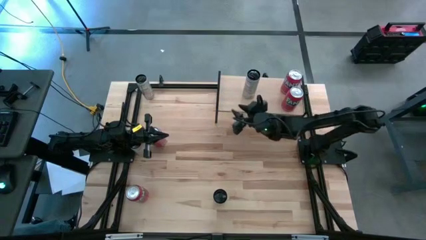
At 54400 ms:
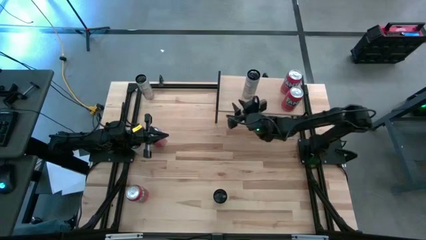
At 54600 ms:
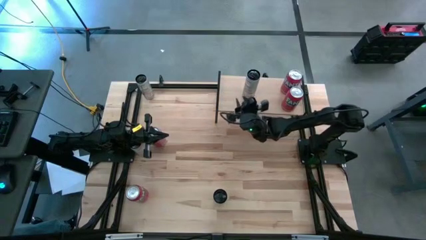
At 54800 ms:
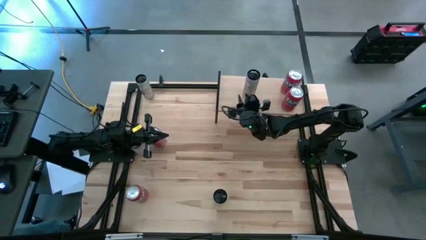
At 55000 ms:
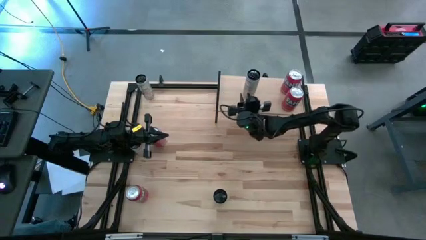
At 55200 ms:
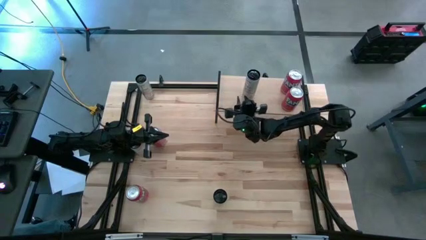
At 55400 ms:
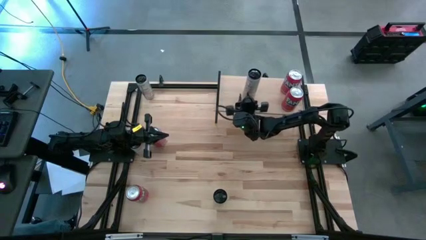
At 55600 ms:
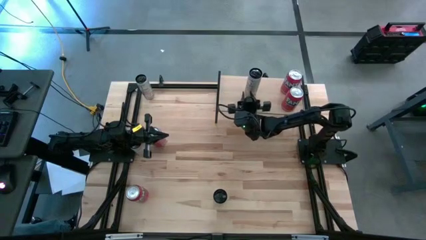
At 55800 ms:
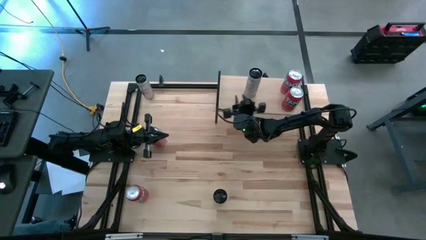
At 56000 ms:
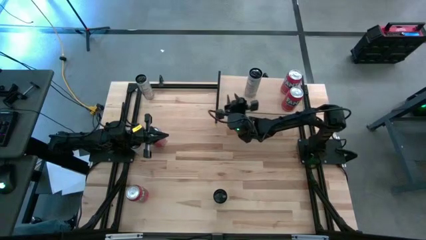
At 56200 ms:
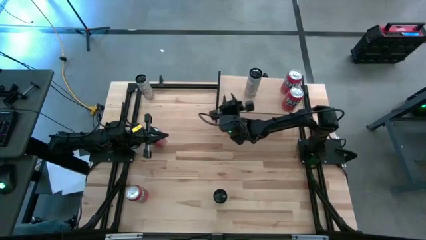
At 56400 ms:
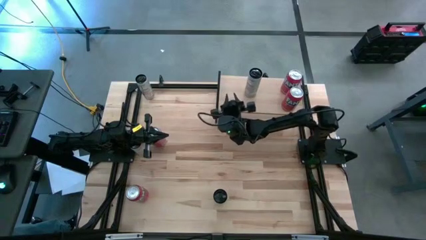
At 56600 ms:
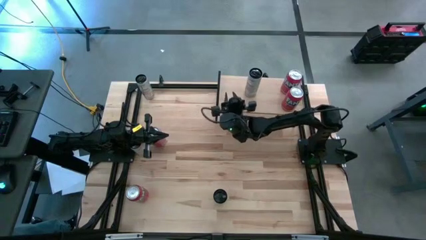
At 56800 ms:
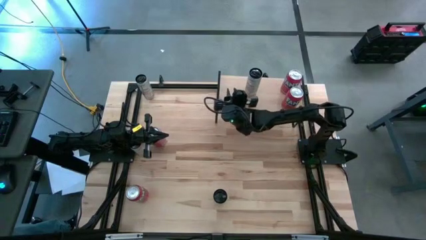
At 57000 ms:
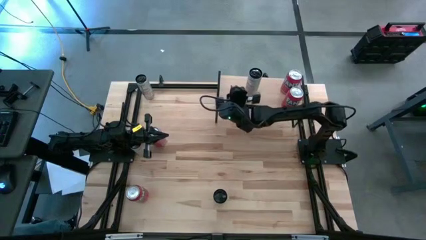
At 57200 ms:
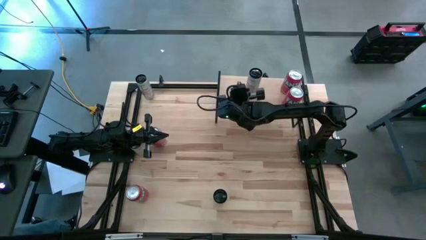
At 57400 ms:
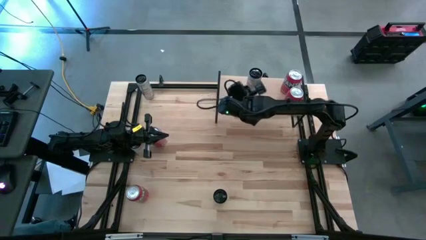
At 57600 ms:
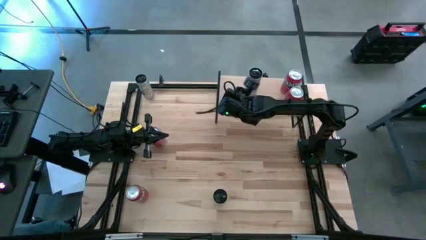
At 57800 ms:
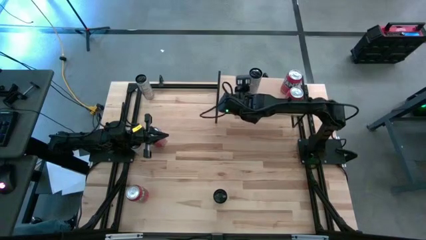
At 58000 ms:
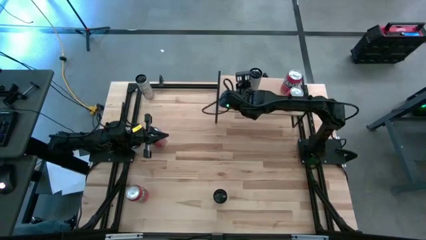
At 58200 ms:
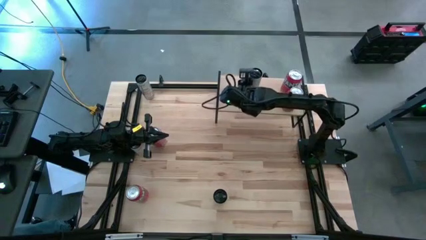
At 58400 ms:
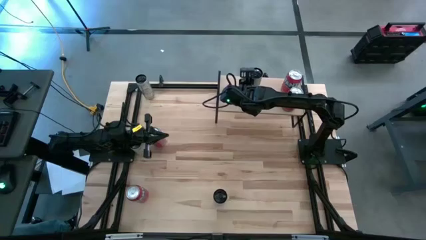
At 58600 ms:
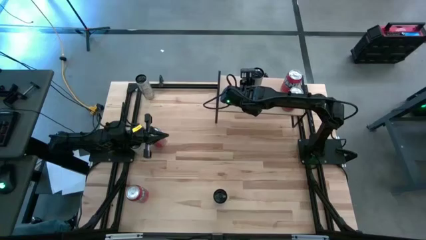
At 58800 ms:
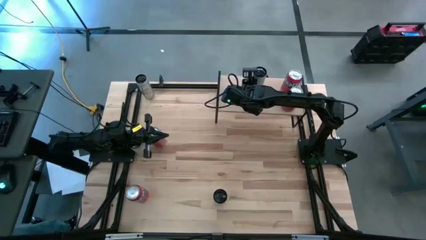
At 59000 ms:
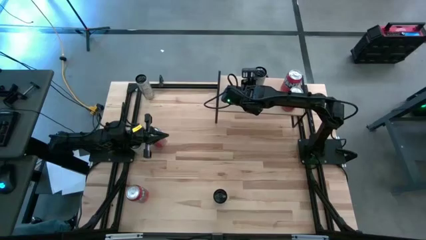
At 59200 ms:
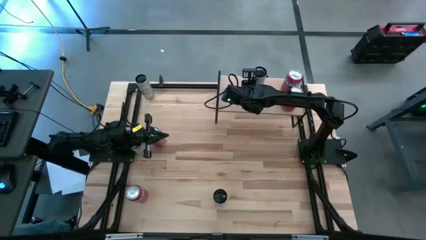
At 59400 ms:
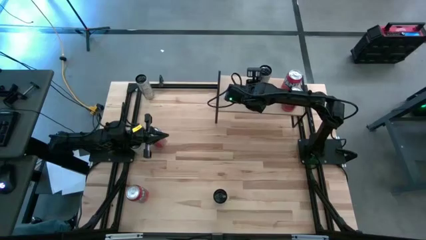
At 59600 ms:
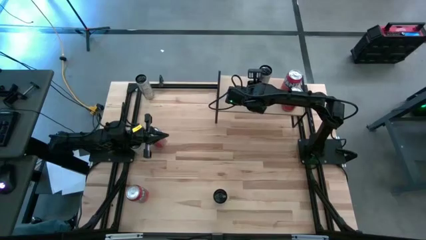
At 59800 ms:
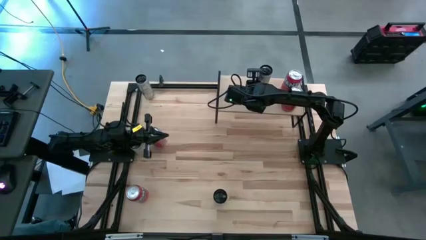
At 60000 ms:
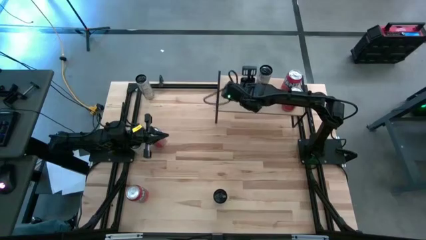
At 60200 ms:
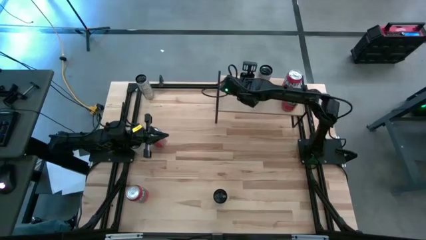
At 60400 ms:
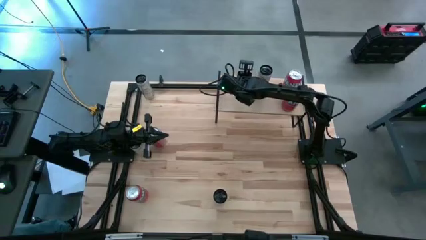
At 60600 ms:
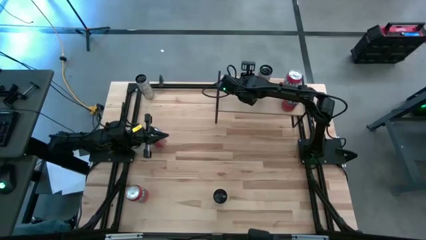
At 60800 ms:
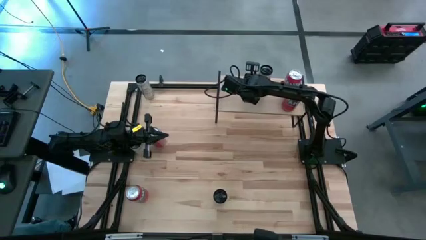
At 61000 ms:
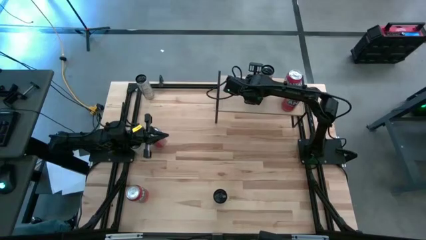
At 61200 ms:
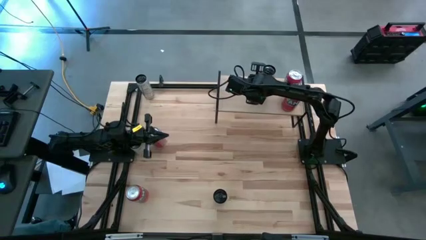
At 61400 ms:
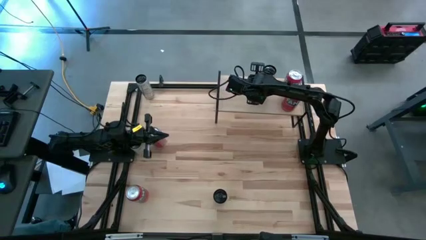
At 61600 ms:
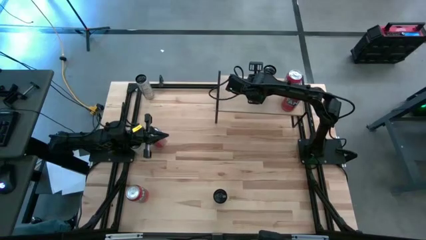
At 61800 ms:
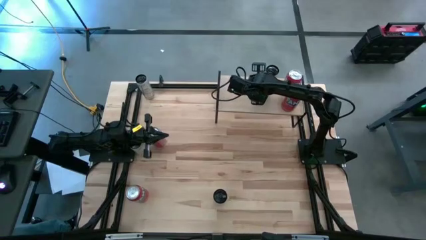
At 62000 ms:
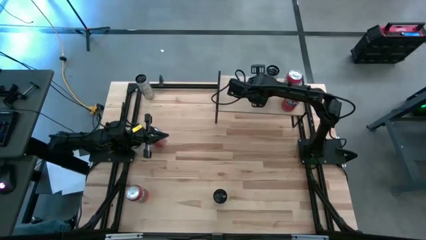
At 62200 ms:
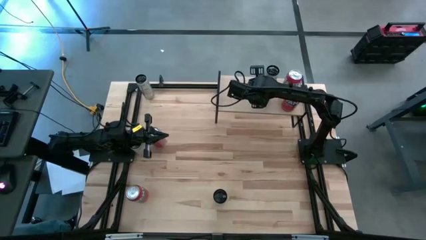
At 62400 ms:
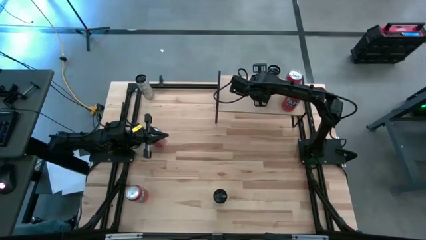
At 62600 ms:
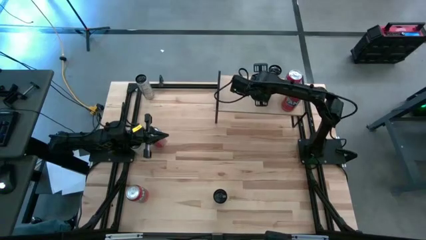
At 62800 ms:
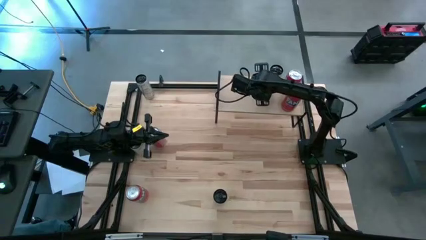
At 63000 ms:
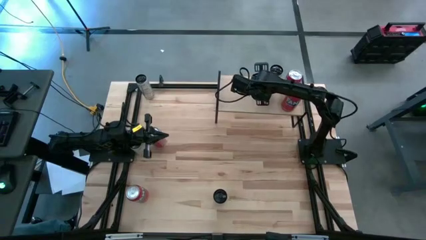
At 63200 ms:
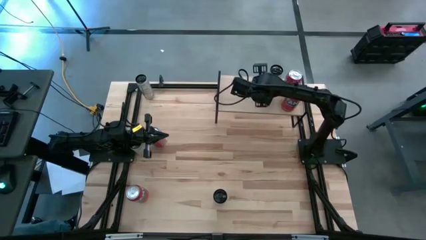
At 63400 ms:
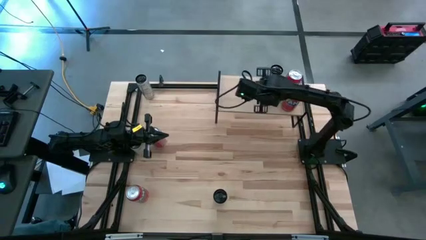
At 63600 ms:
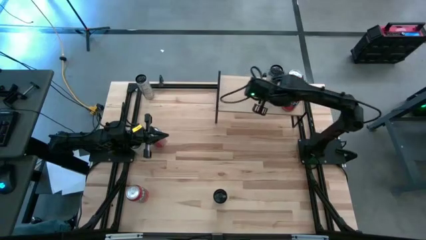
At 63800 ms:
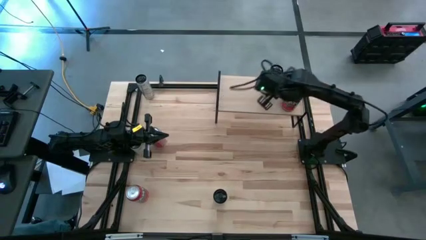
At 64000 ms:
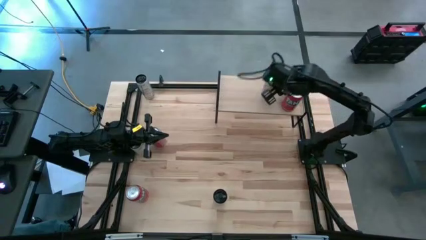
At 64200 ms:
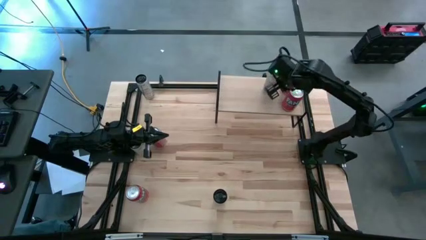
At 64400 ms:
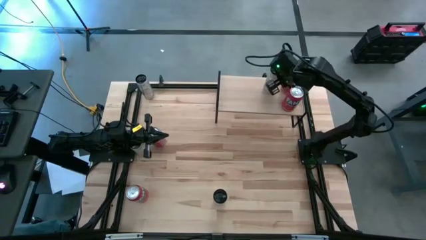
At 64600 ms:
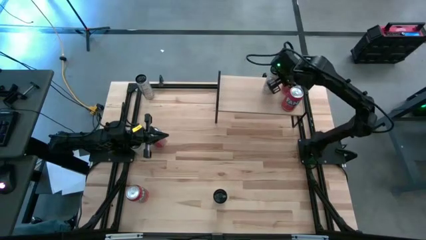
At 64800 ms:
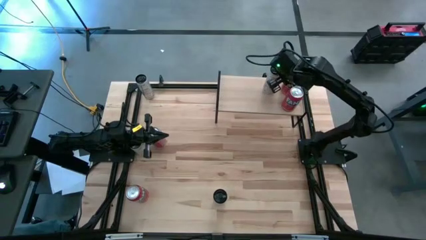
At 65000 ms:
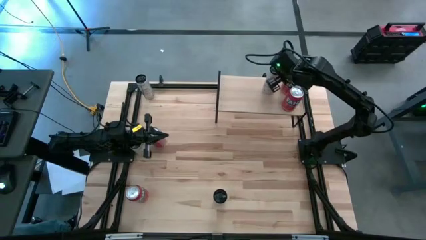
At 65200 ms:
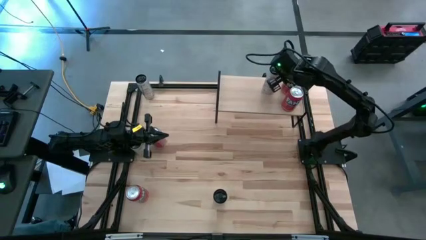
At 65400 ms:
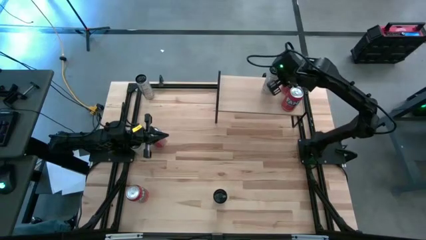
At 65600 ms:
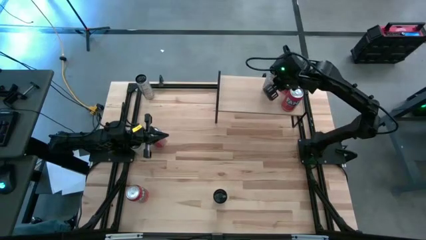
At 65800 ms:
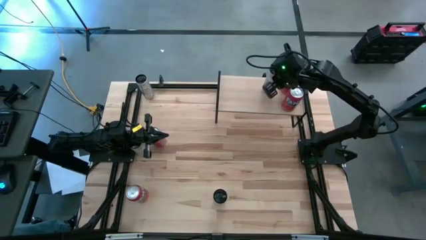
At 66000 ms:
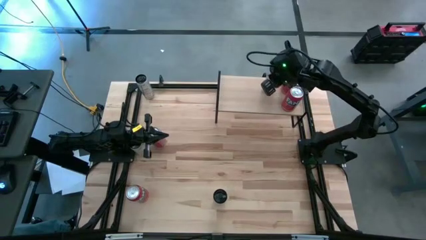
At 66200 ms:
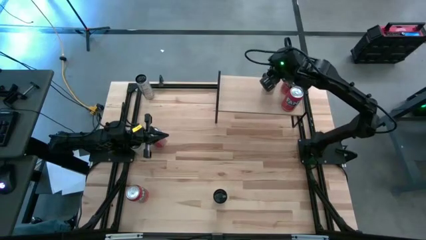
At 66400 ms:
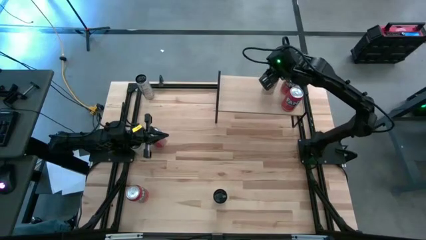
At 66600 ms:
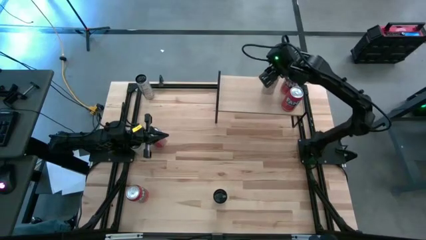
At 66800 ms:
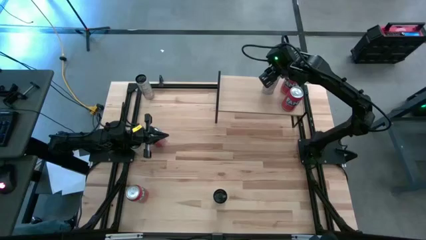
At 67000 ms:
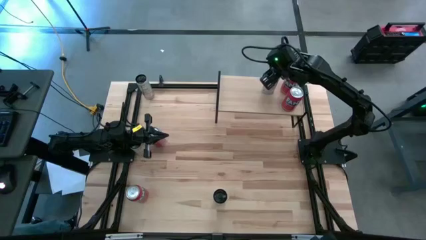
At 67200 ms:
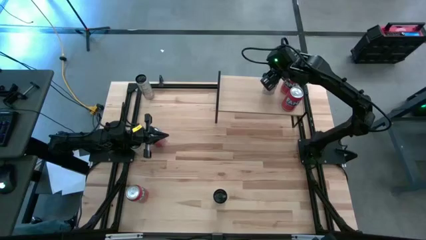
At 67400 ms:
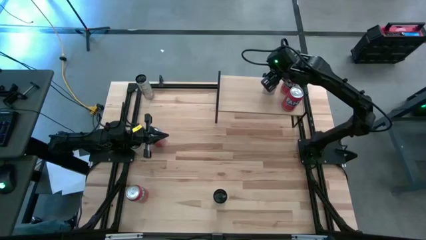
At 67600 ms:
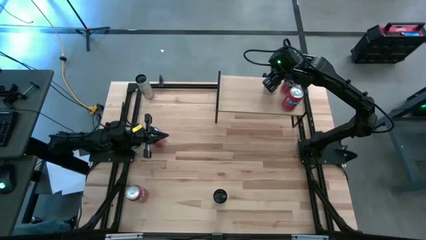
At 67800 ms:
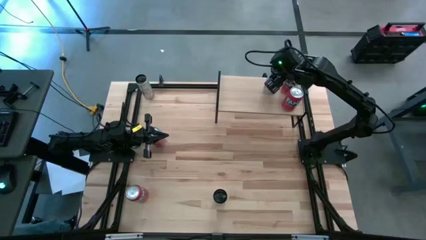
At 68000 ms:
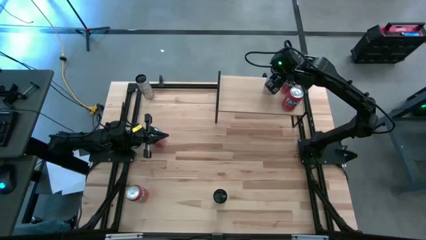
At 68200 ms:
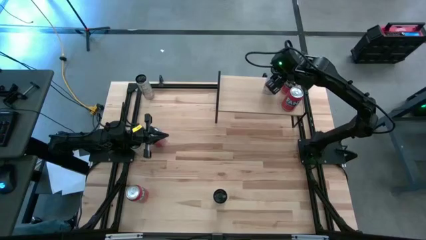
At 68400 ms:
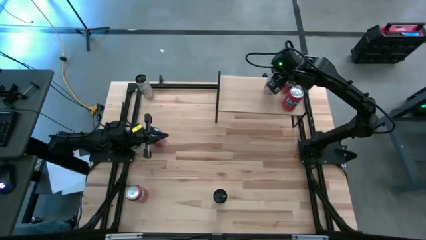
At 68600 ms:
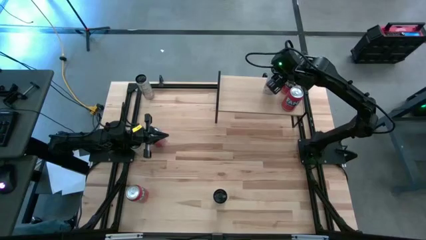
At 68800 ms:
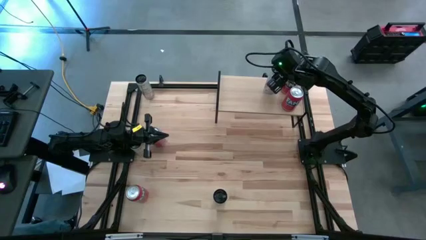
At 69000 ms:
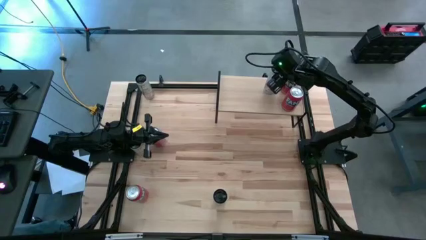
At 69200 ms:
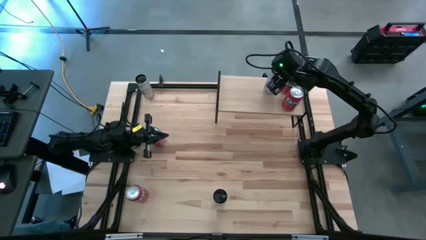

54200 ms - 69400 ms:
Task: Place canned beverage on shelf
Put the white soda can on the shelf
